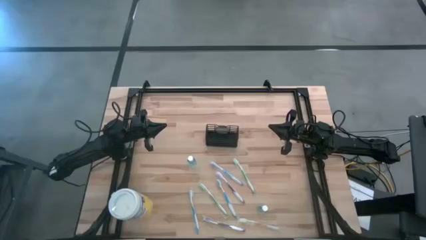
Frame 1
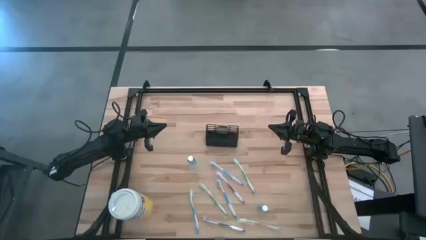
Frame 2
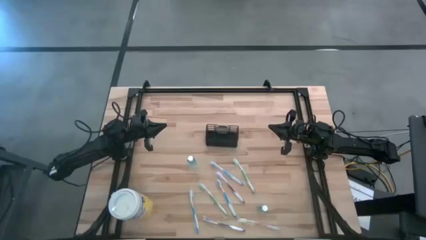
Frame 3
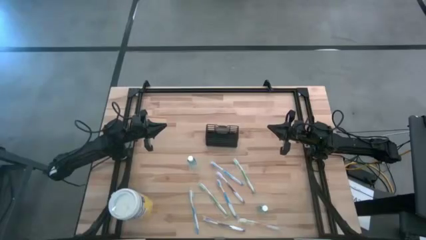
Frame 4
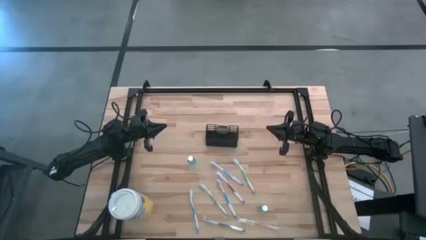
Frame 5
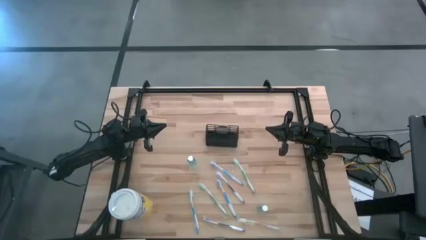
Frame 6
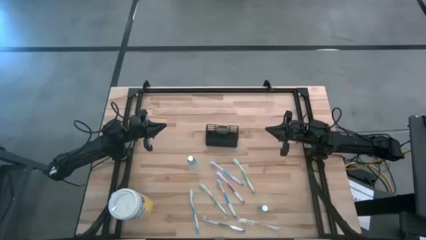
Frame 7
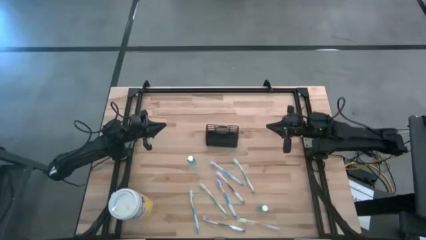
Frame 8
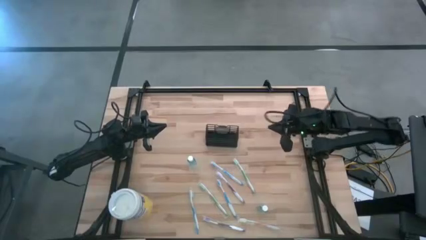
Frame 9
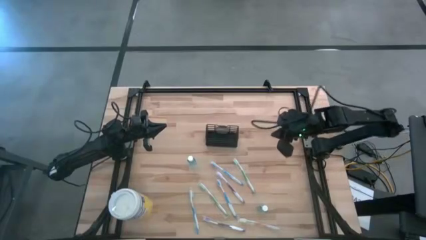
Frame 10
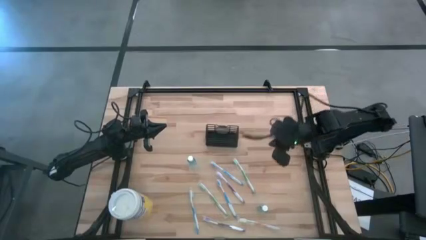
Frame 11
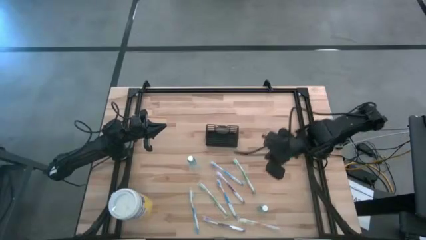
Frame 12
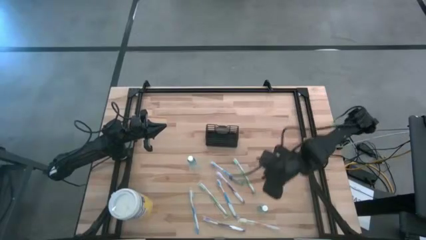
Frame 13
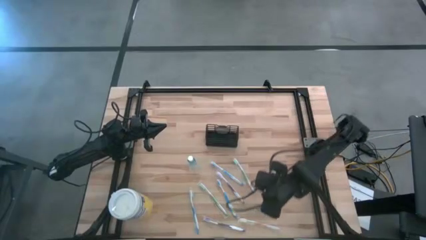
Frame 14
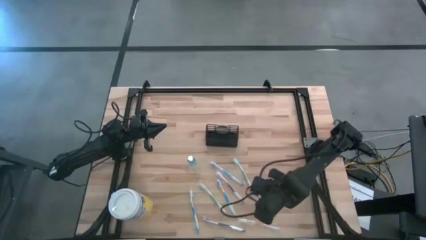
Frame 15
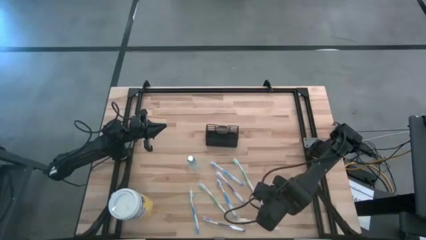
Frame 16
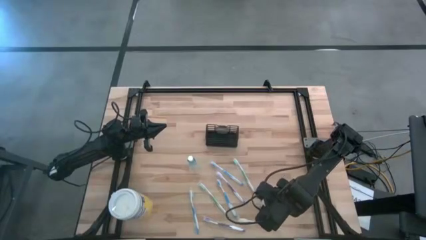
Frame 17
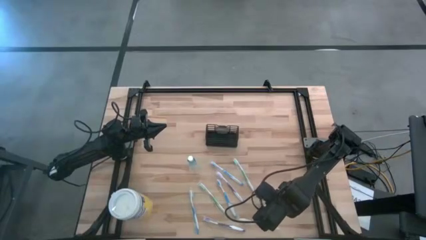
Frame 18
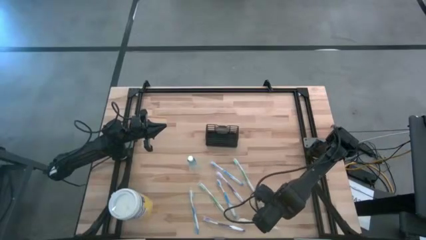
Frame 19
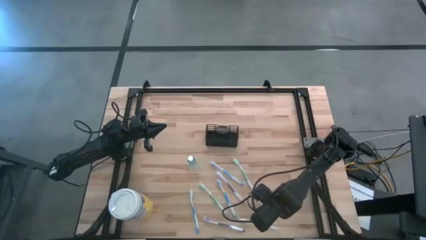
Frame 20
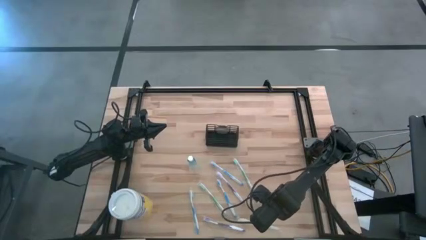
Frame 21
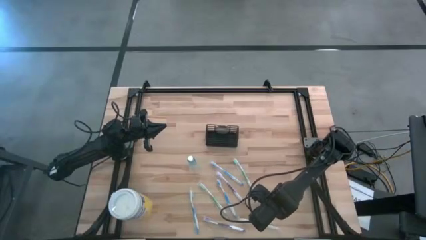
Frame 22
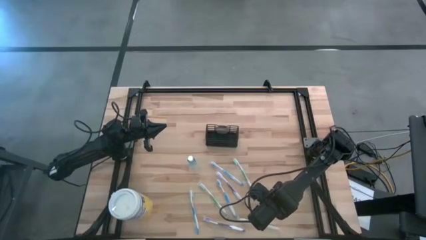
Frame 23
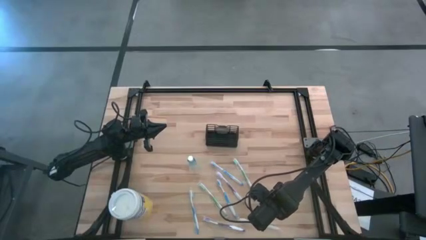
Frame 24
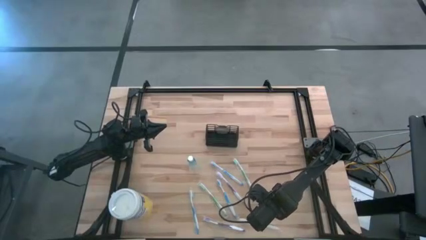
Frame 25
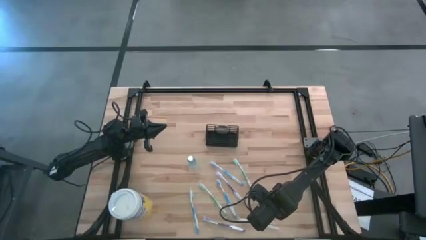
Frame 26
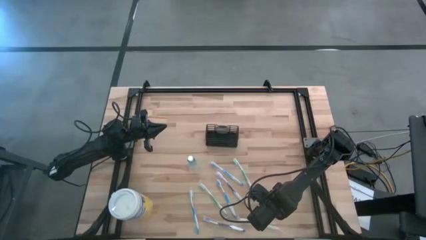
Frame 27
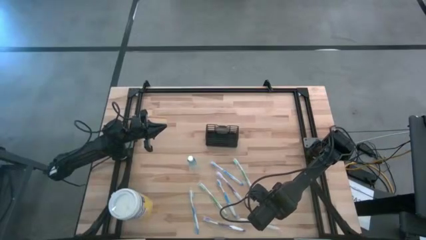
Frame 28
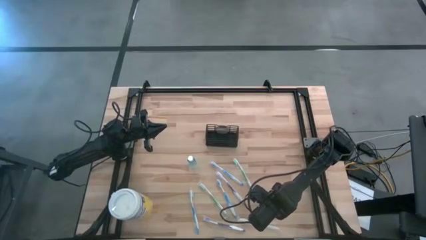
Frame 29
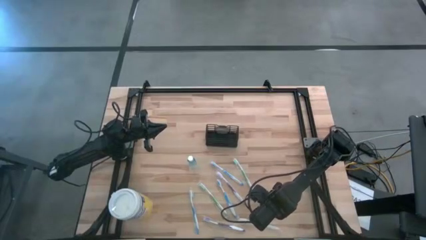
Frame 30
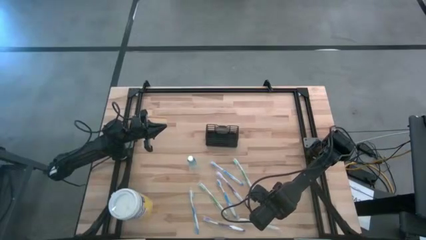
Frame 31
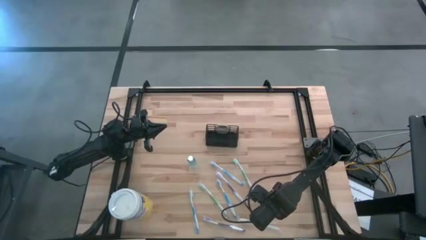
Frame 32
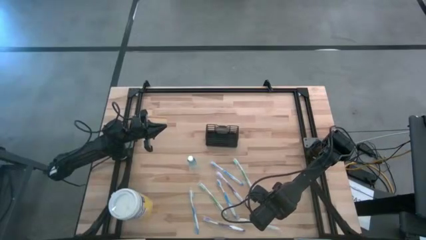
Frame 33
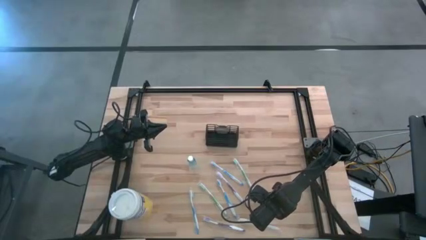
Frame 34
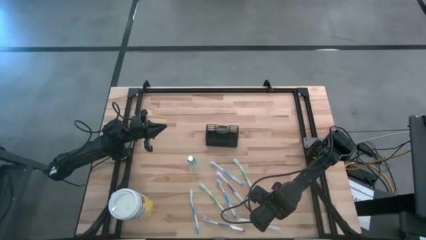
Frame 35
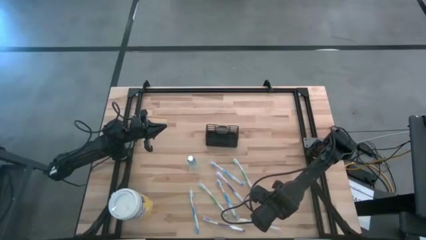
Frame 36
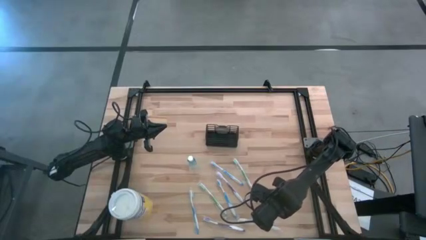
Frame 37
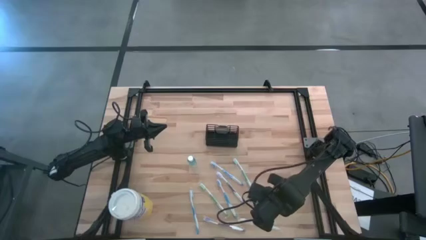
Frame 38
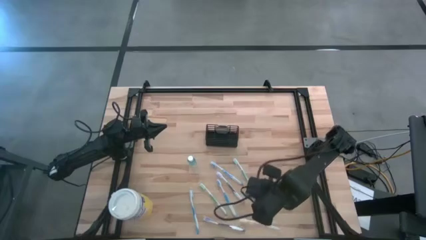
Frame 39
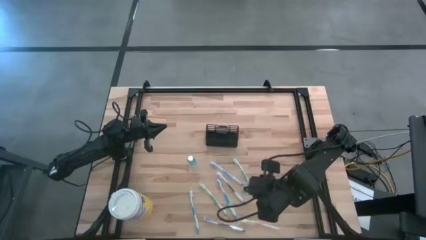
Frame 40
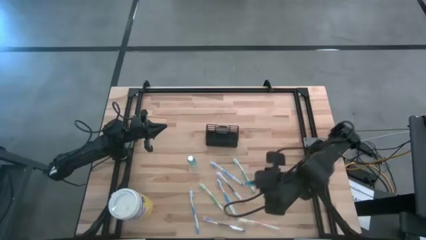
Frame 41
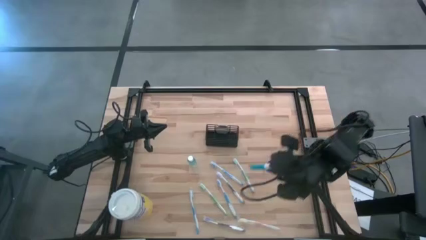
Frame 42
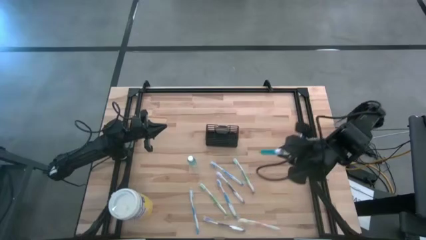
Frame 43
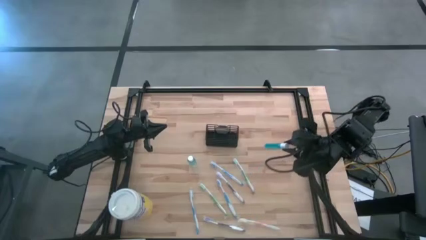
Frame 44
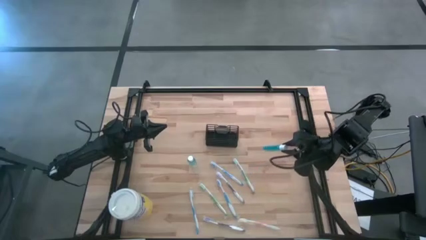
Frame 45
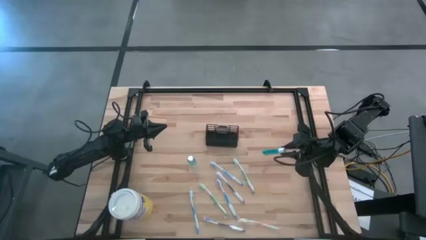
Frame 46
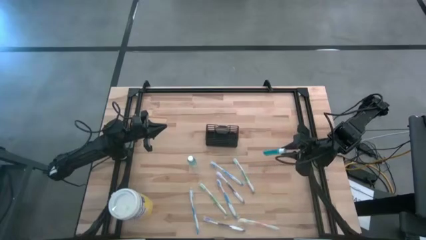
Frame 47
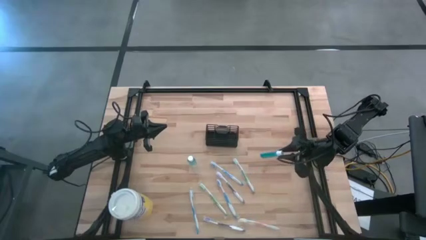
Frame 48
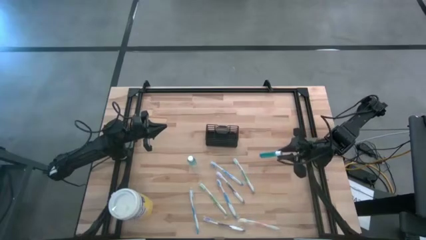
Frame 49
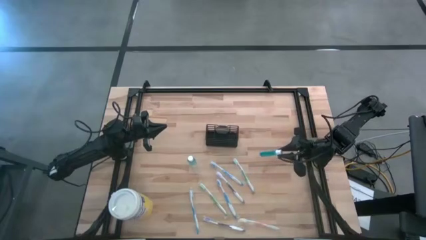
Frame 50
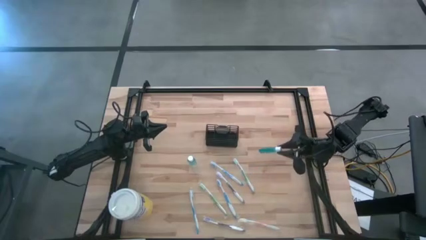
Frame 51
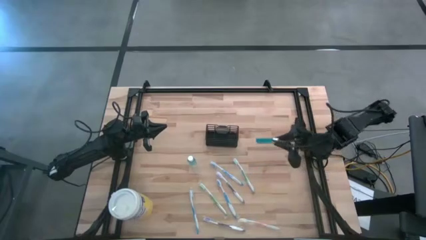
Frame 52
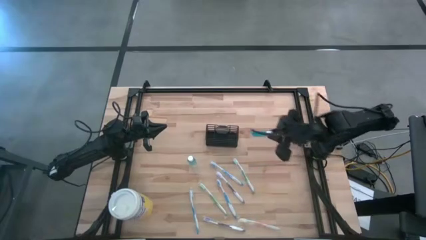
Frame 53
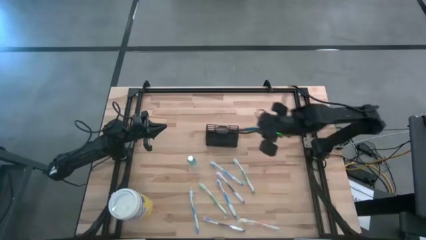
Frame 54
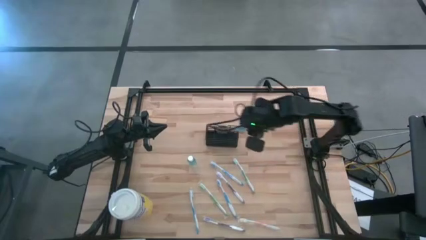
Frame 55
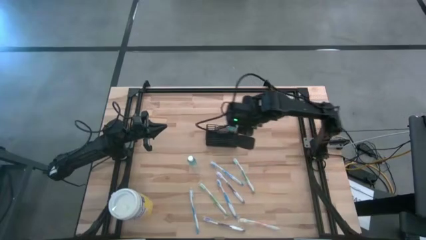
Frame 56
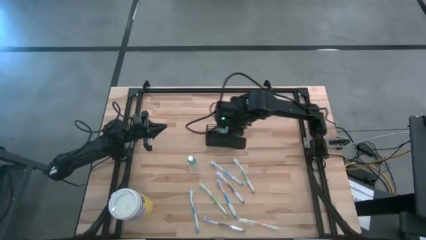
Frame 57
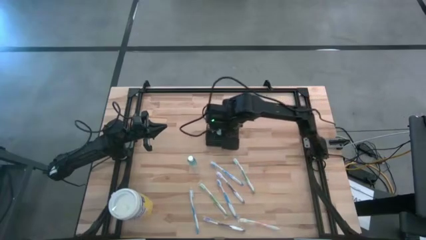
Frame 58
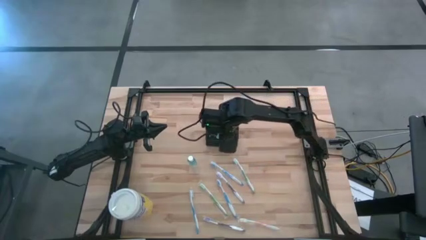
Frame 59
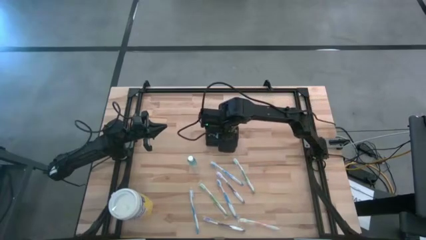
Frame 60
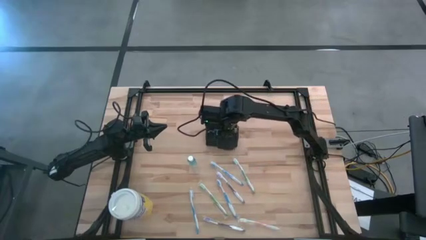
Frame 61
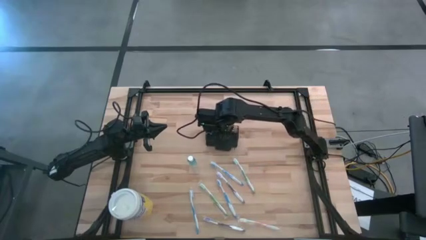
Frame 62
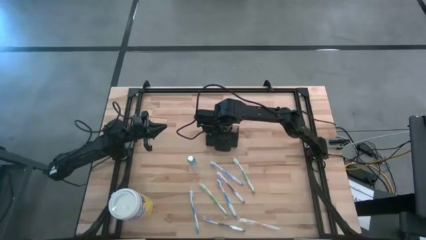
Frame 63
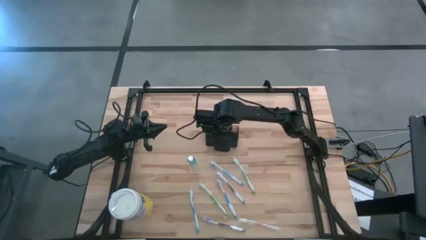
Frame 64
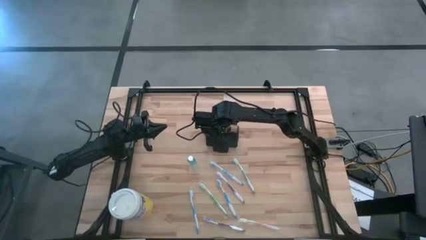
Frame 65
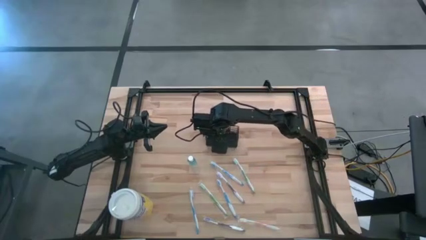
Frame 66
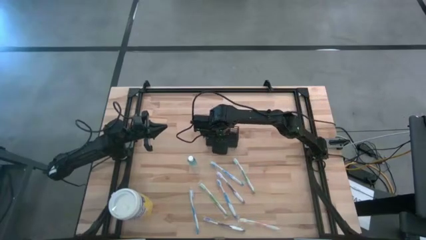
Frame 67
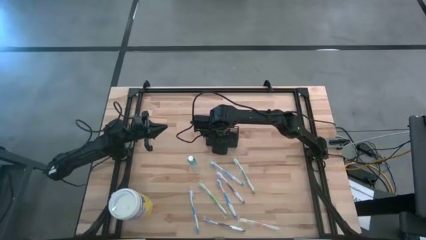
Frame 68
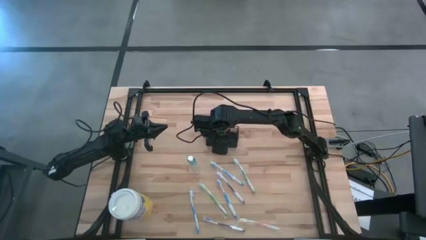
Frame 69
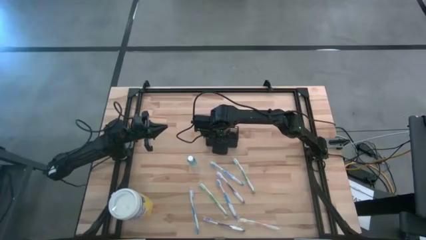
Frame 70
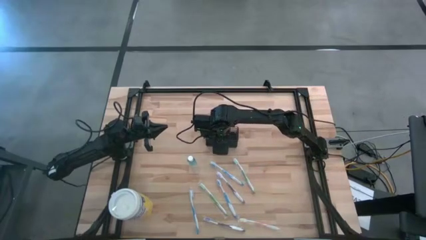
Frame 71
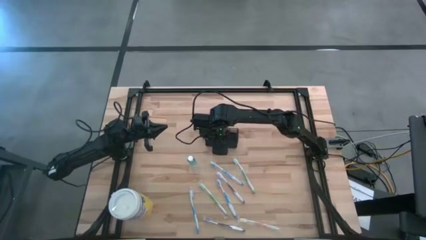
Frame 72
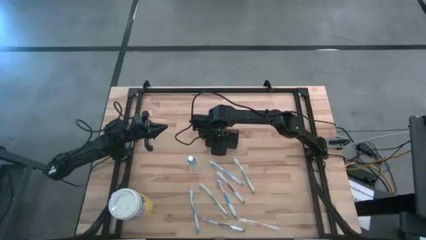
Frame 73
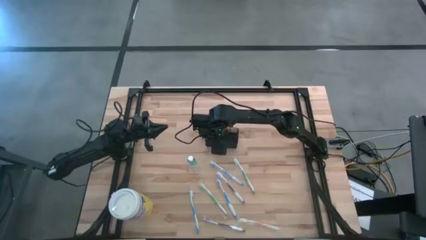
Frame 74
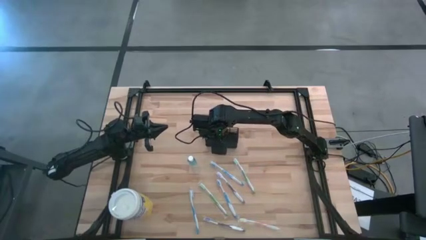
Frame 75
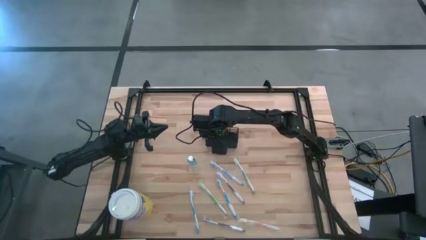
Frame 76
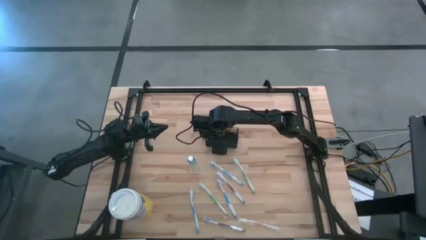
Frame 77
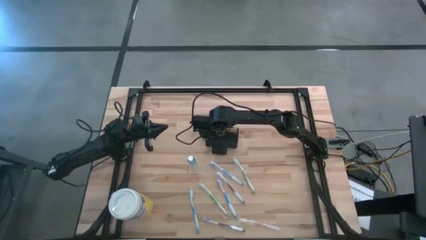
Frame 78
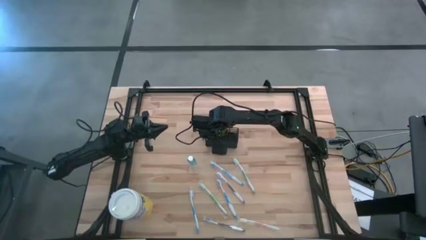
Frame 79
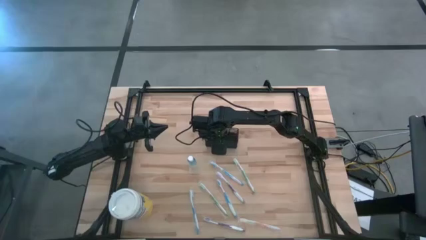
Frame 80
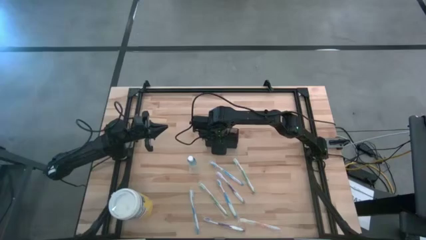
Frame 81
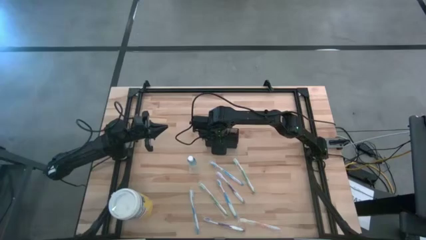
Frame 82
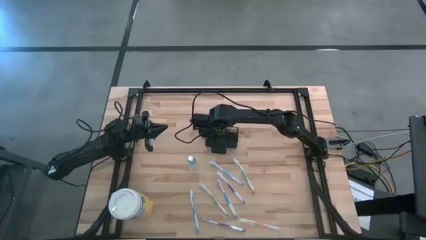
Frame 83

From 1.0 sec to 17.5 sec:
Task: Pick & Place toothbrushing station
Put the bottom mouthwash into the wire organizer
